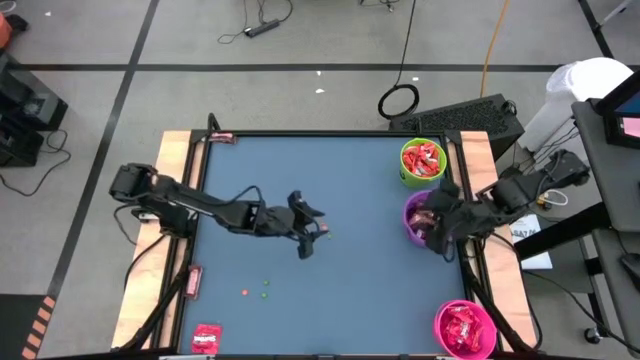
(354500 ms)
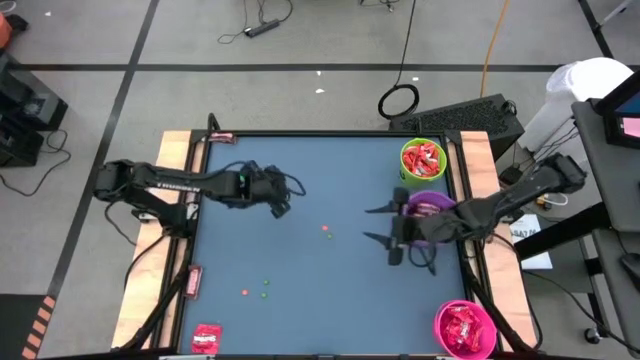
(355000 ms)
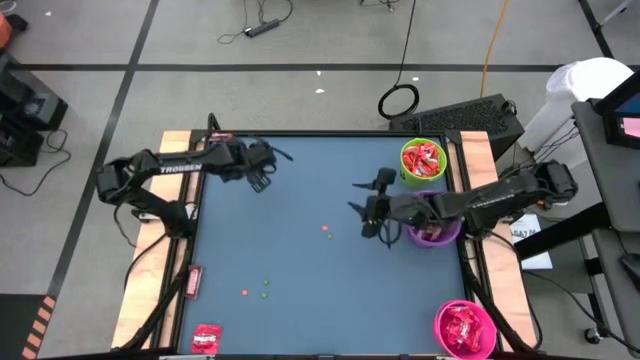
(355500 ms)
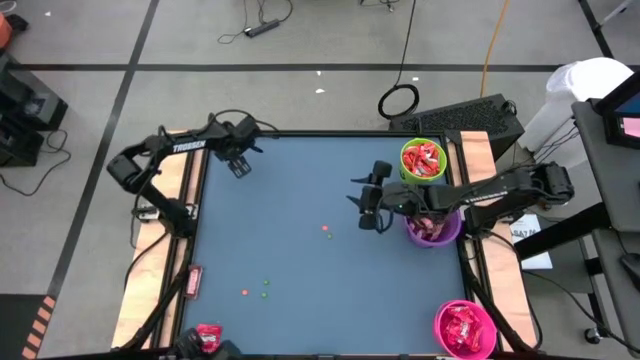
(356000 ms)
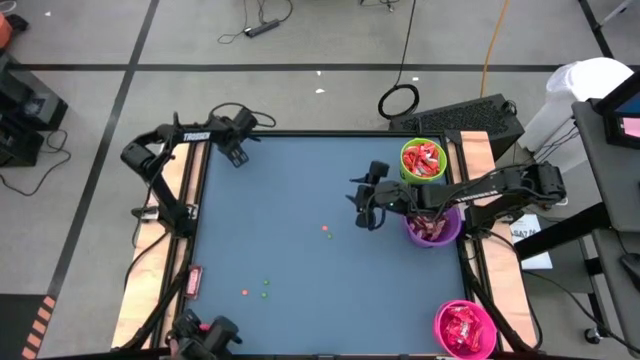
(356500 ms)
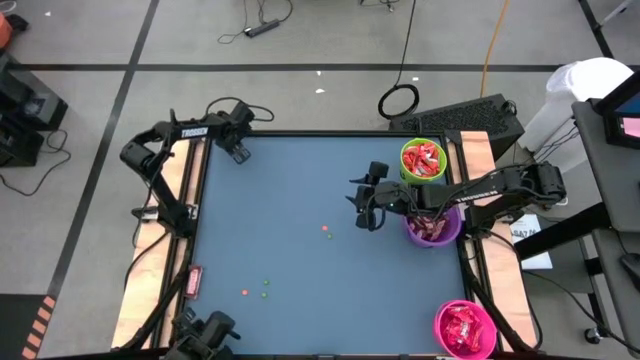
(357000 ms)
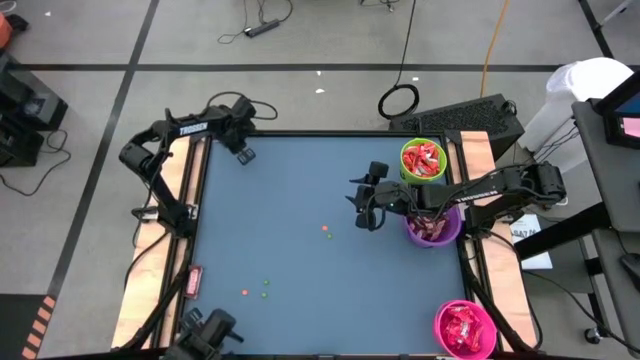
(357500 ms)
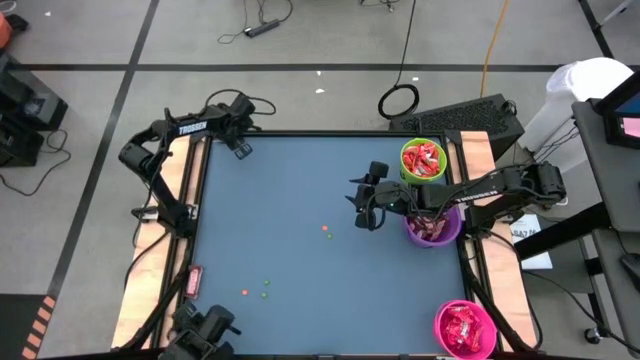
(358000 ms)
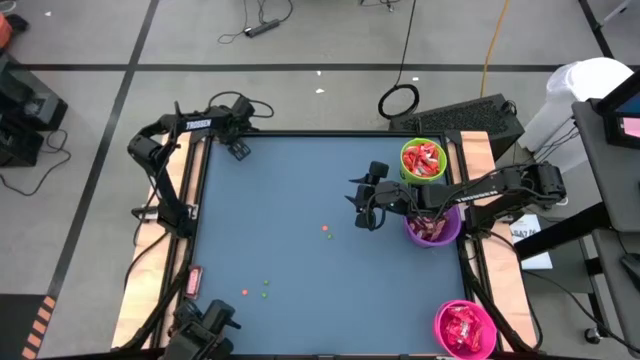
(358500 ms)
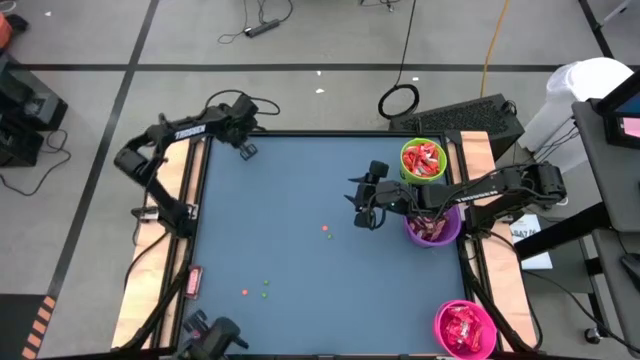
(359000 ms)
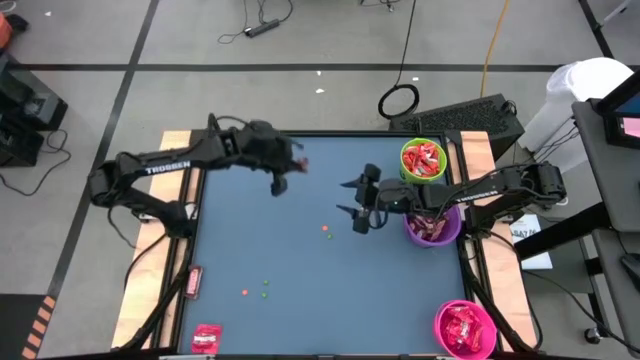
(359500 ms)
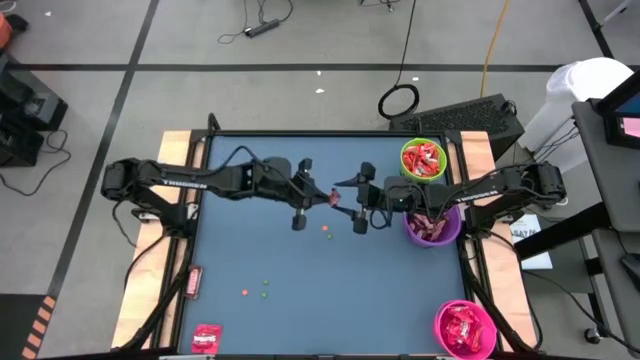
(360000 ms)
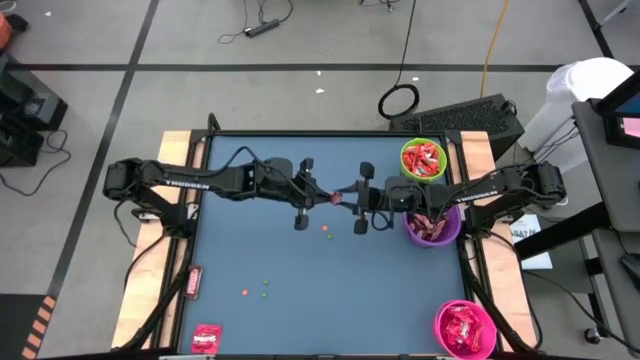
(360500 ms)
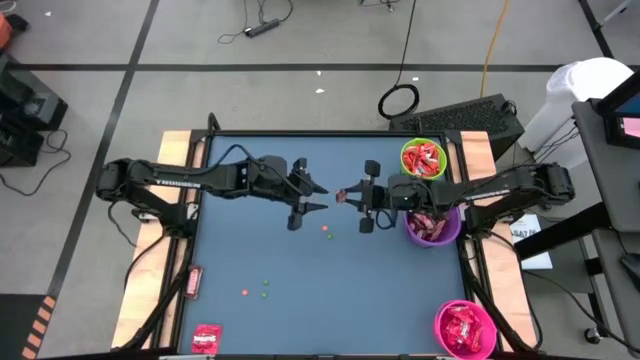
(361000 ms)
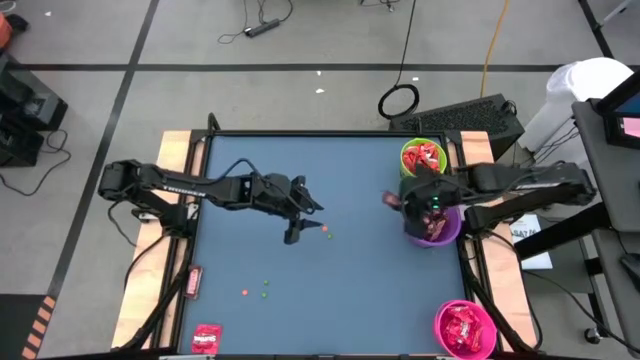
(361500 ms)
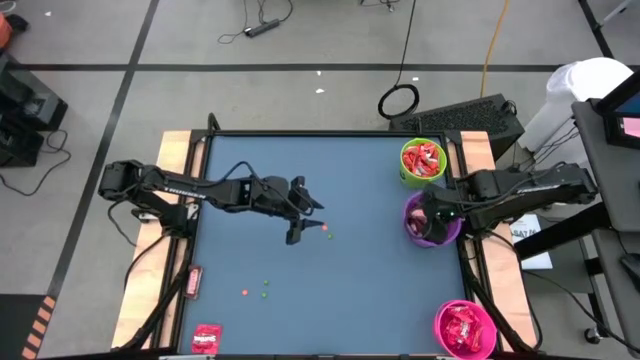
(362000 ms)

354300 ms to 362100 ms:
Task: Organize candy in baskets
Put the brown chocolate bar into the violet bucket

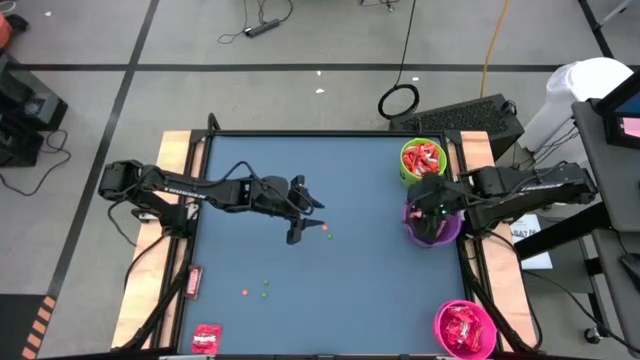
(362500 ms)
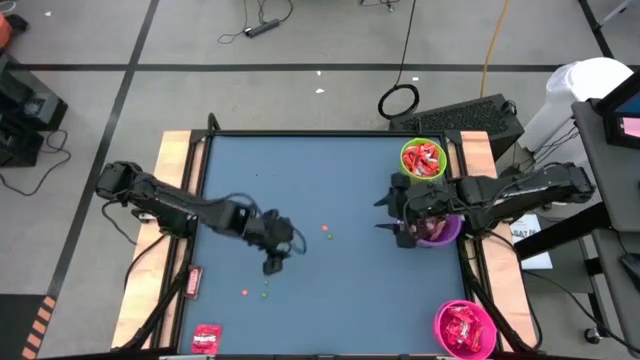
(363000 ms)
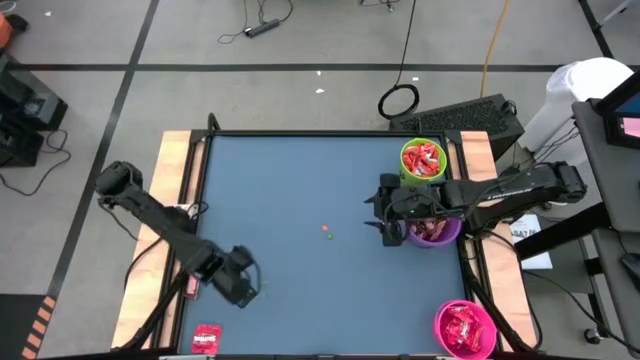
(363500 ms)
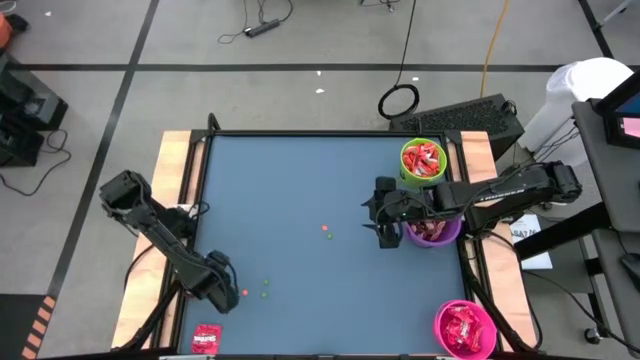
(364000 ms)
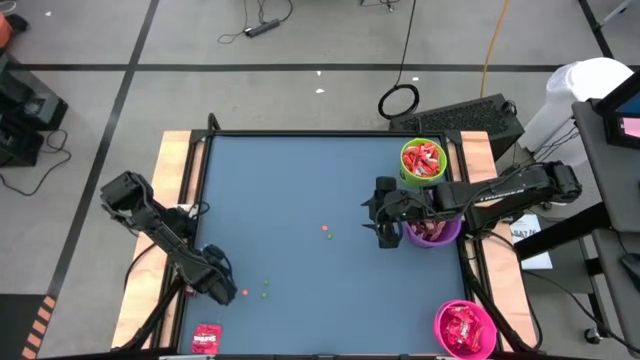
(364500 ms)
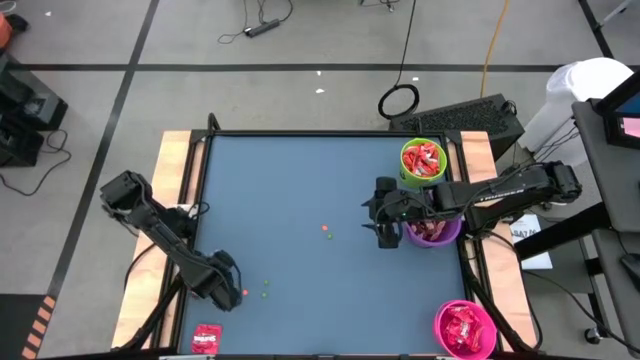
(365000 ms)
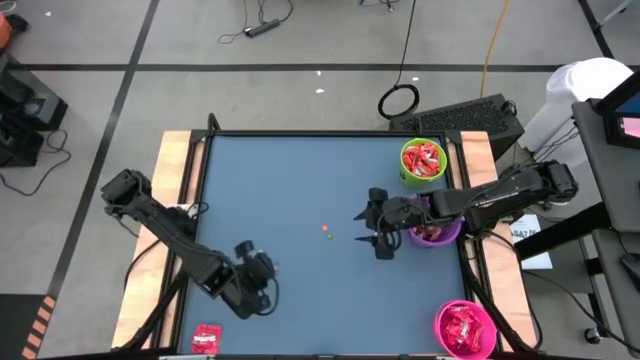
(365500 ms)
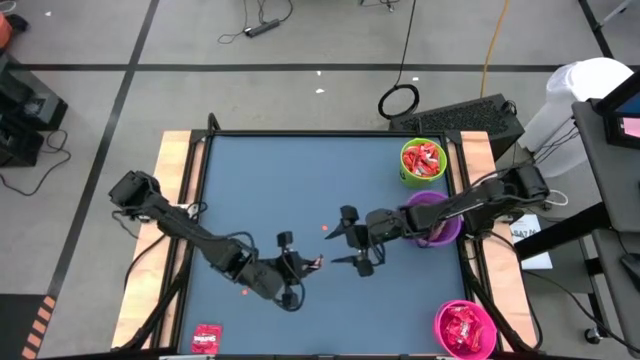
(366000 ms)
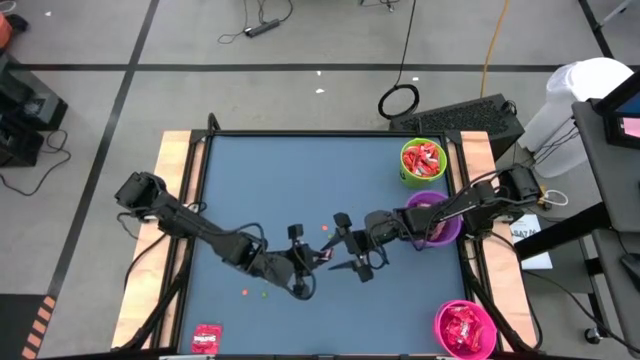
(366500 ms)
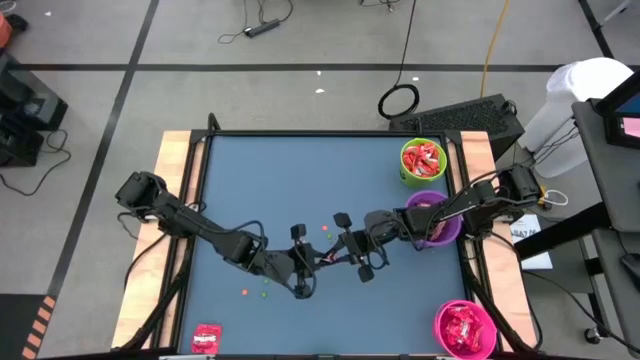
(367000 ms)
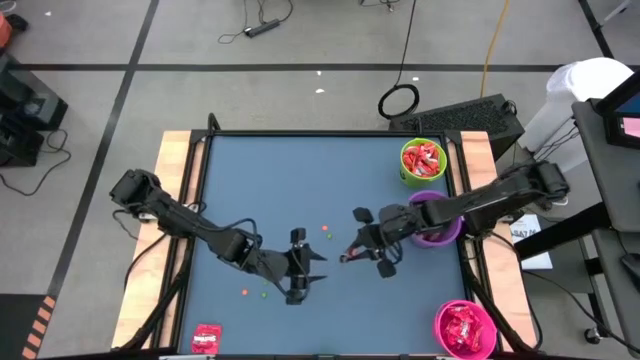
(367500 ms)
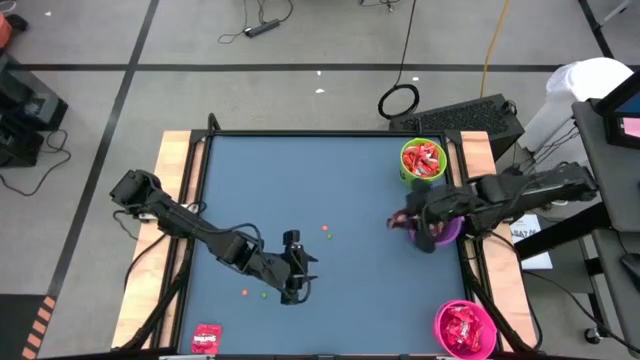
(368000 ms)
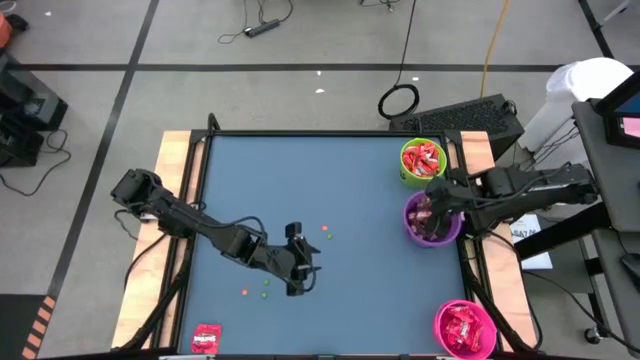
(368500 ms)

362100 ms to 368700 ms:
Put the brown chocolate bar into the violet bucket

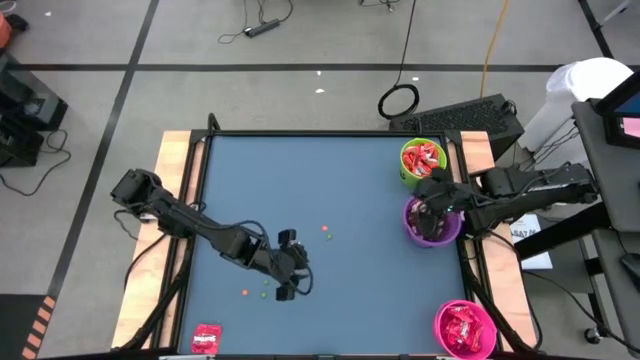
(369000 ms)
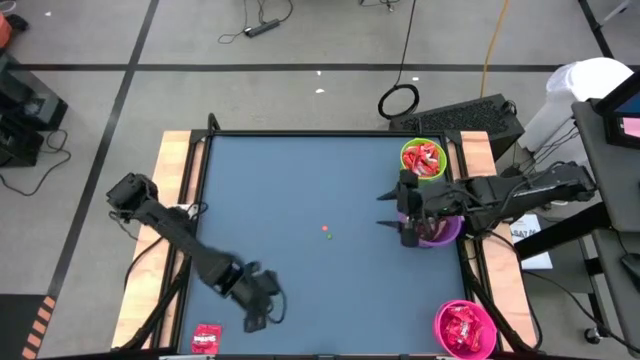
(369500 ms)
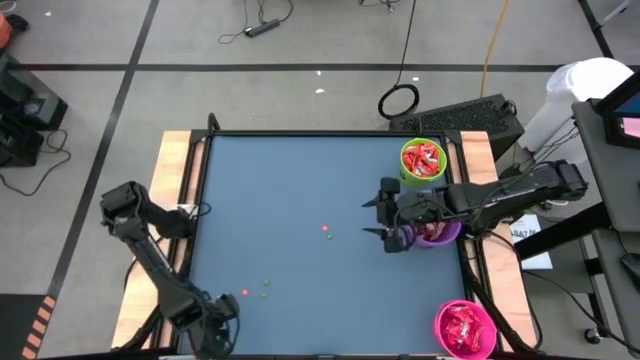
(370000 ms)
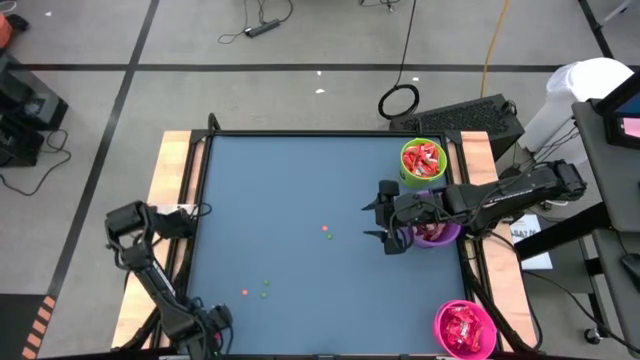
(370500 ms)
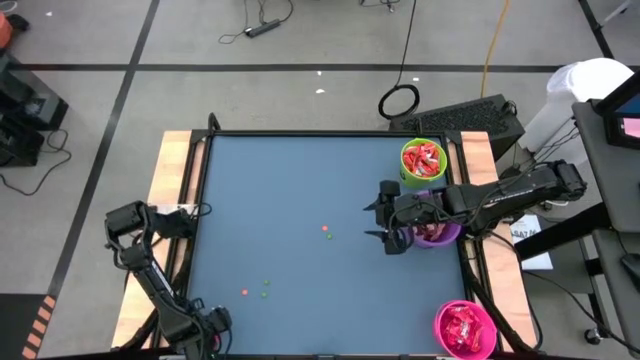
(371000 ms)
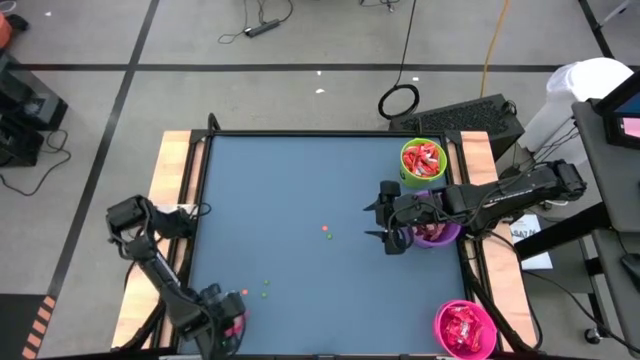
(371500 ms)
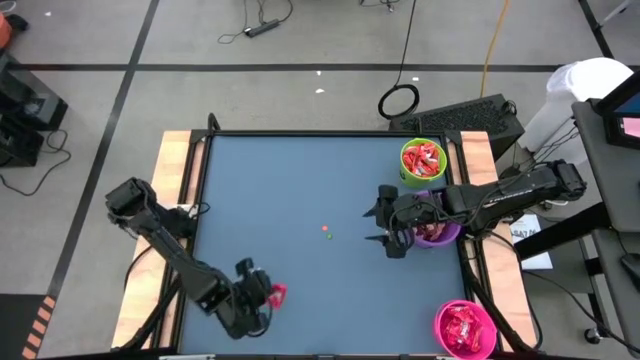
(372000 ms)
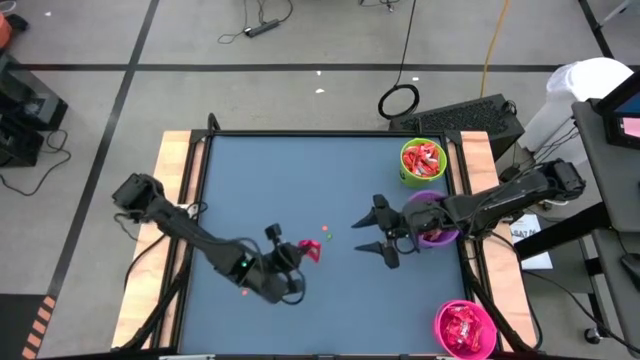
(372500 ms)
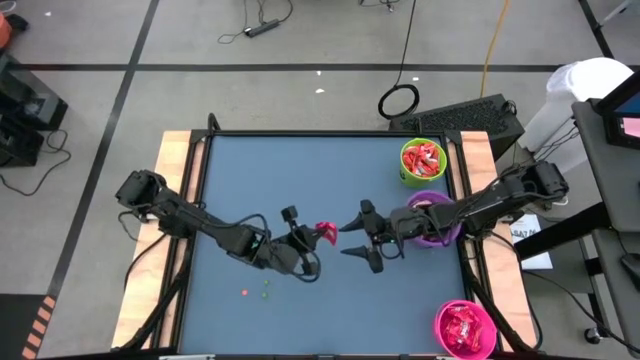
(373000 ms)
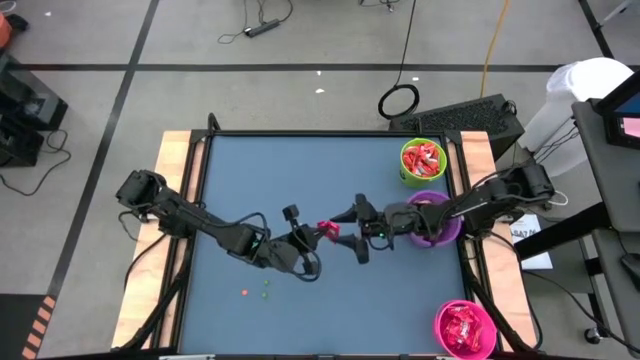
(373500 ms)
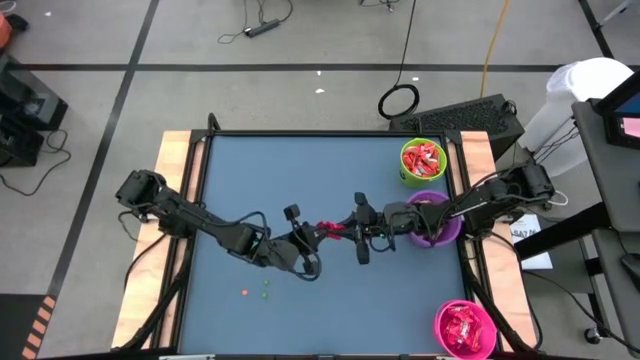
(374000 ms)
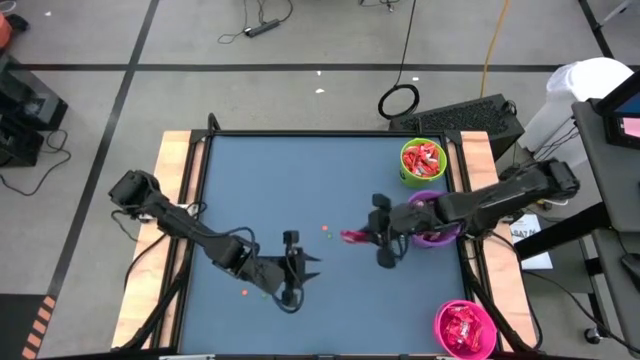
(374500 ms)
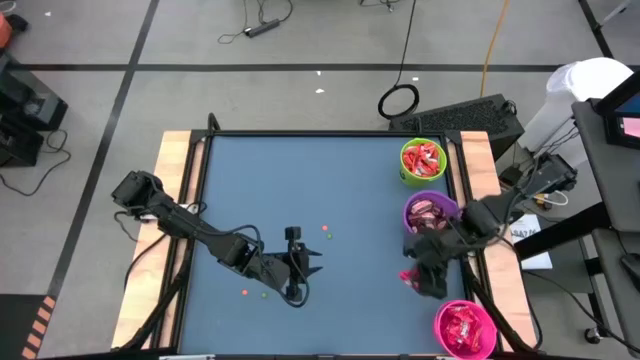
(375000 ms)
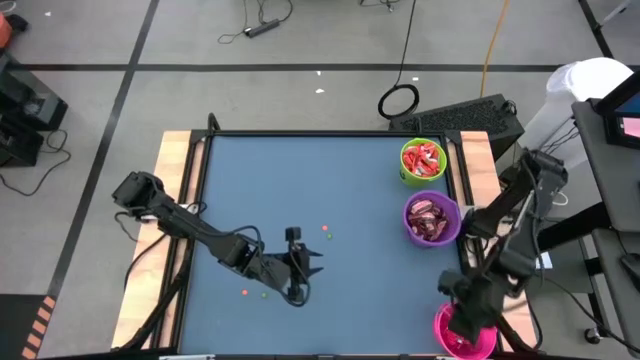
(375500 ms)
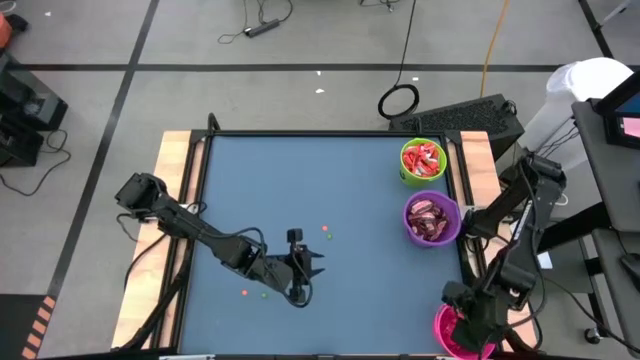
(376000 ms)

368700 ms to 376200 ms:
Put the red candy pack into the pink bucket
